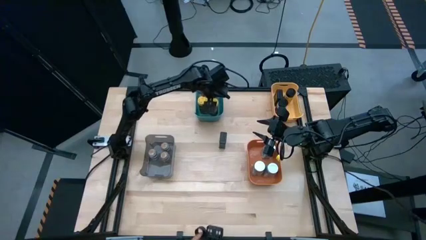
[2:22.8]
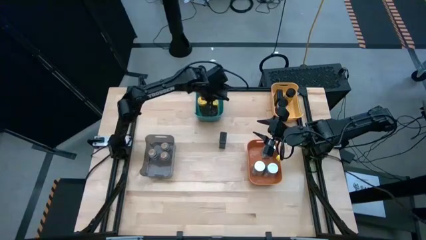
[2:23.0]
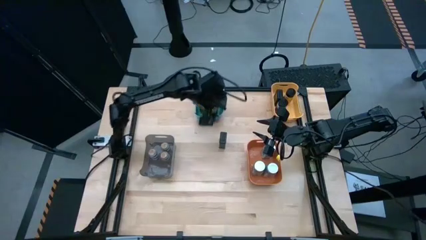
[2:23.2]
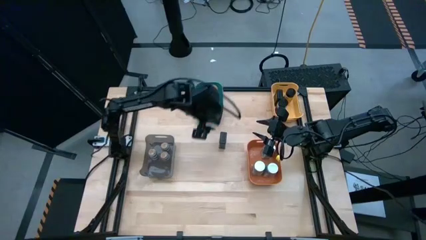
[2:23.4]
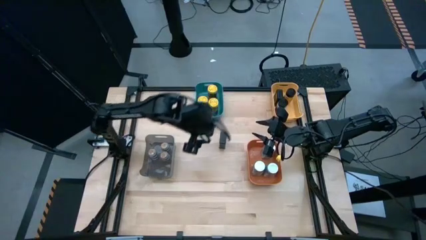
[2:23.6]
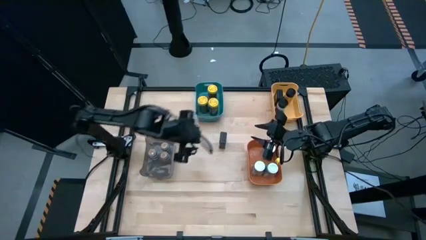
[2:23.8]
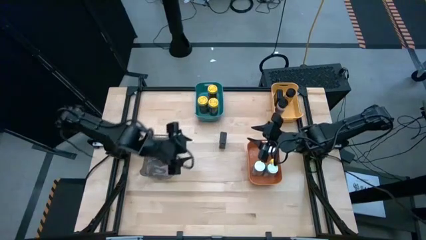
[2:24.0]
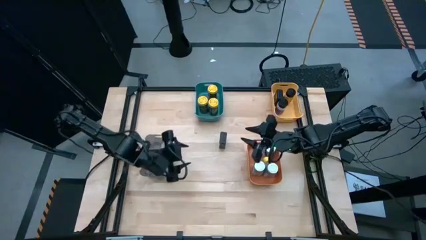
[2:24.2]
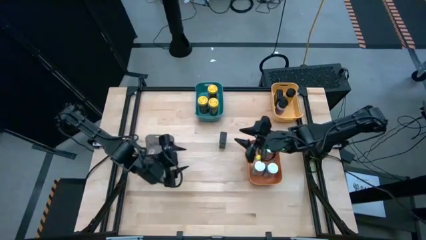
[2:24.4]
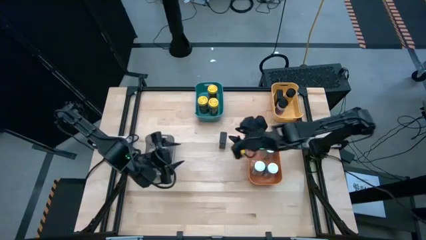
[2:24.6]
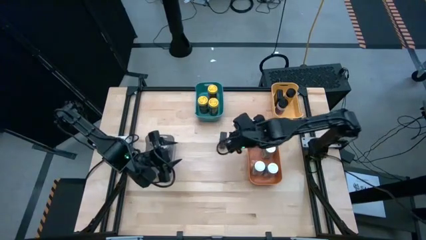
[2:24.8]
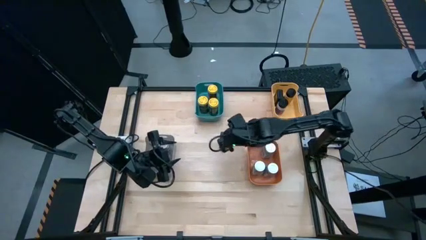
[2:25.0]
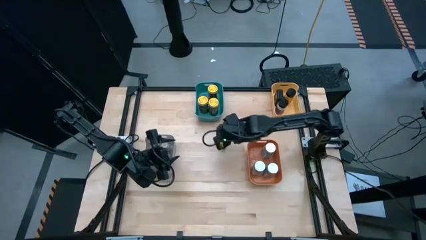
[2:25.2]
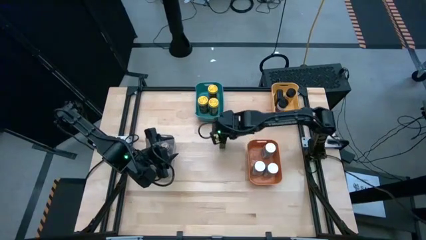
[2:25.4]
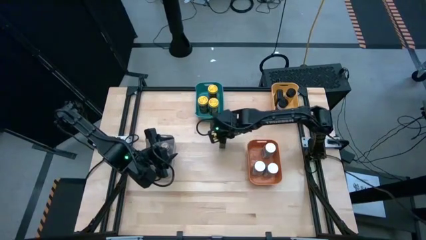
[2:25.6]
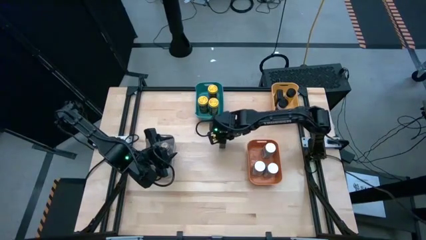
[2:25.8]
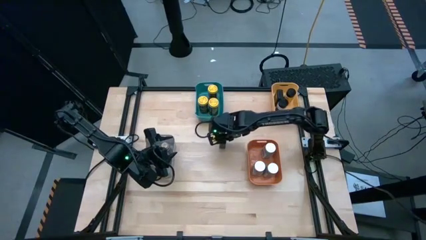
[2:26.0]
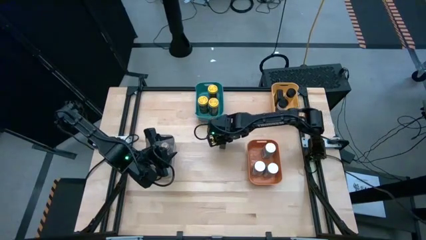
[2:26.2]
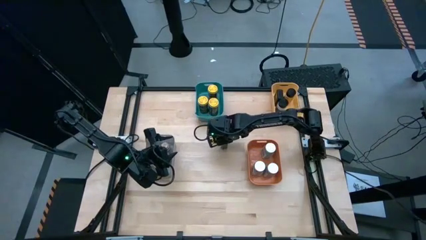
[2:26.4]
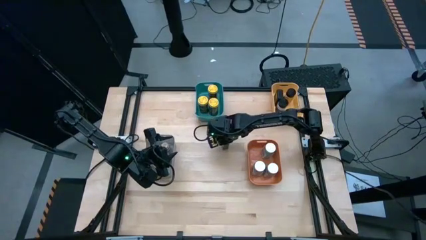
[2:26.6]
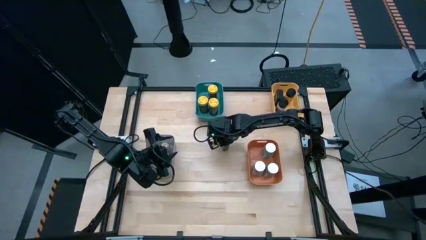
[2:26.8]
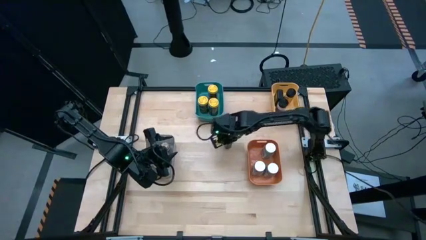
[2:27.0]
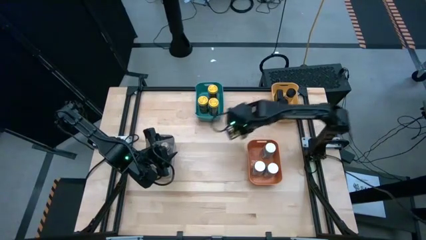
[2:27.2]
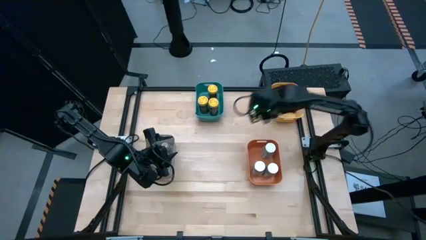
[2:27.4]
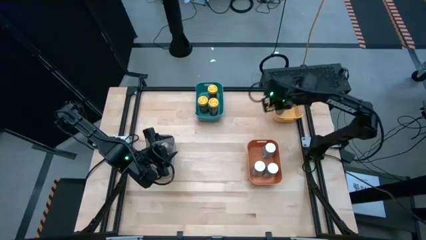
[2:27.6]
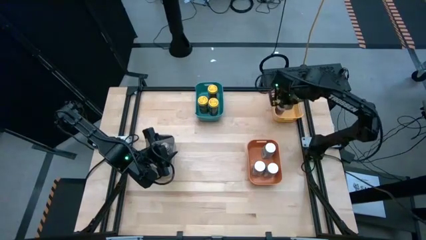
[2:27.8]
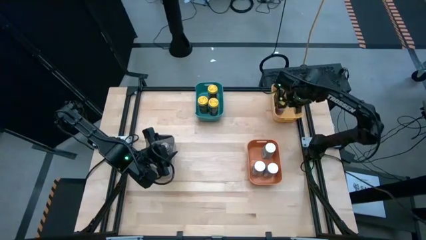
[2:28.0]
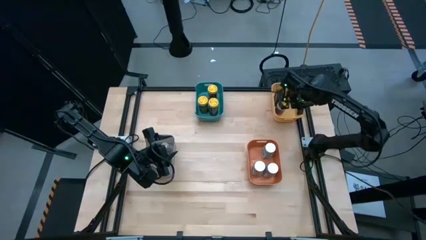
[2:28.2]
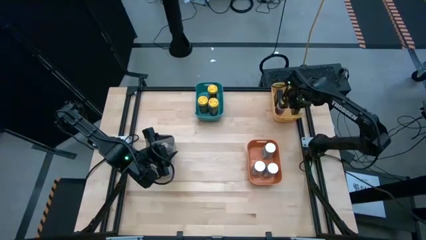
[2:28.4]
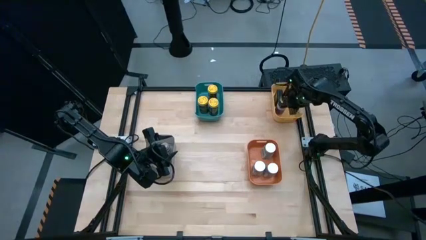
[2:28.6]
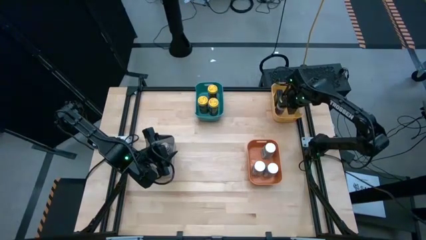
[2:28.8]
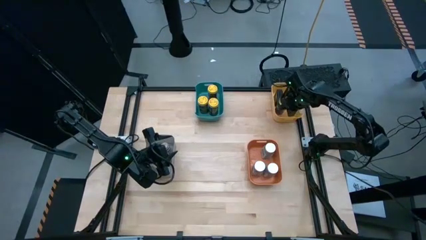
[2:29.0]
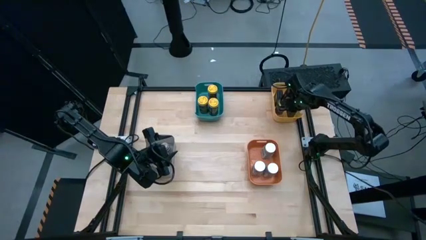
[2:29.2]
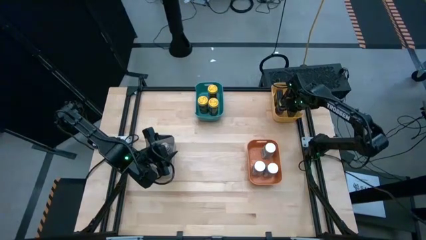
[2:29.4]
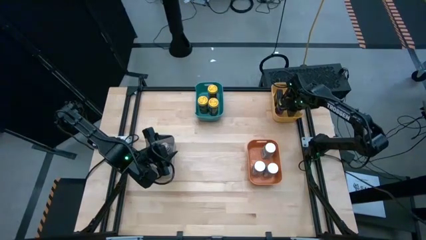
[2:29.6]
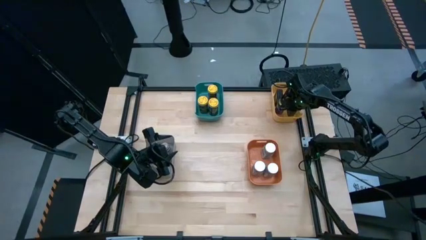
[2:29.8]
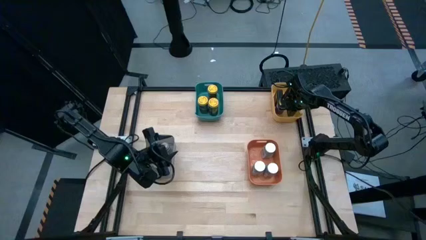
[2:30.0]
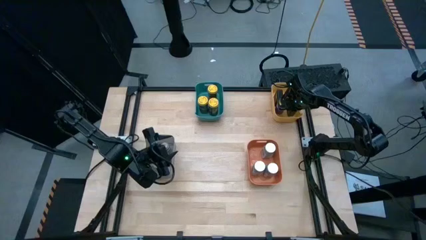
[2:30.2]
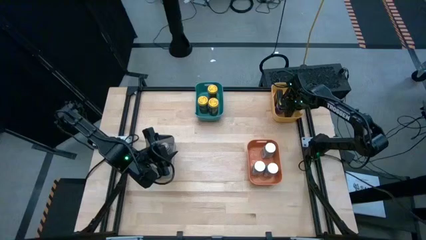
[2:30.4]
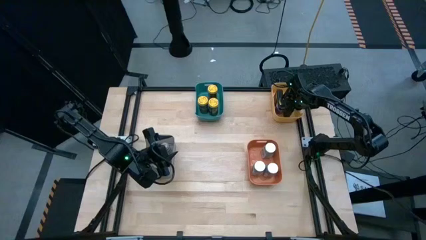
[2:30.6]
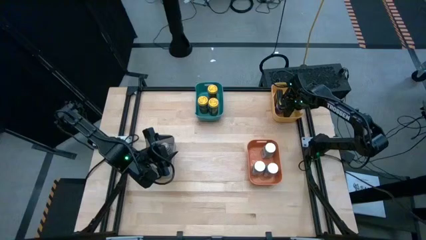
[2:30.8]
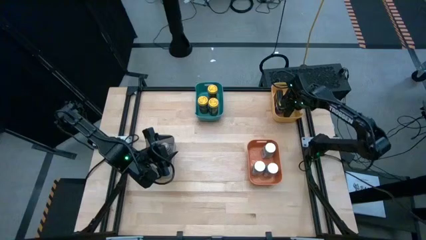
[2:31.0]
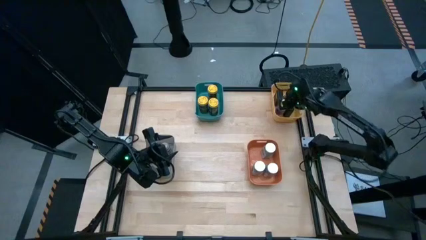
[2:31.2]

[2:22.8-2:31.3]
Task: Sort spices by type
Put the black seasoning can into the yellow bin

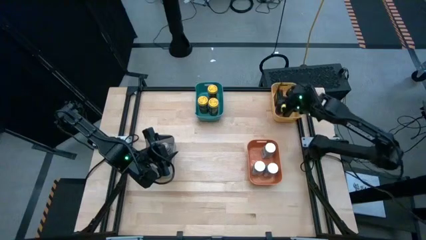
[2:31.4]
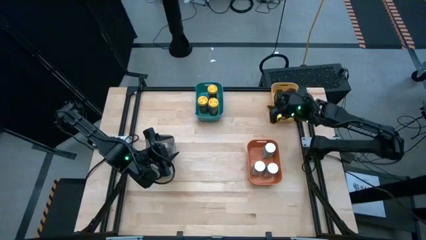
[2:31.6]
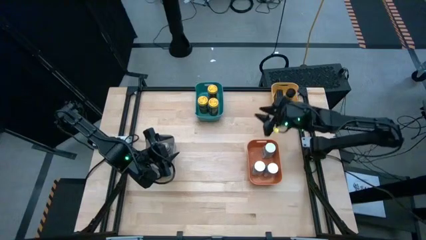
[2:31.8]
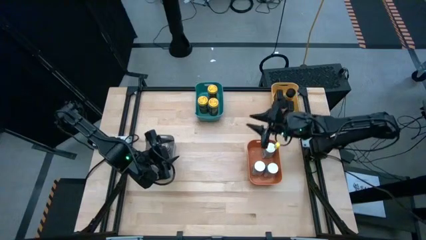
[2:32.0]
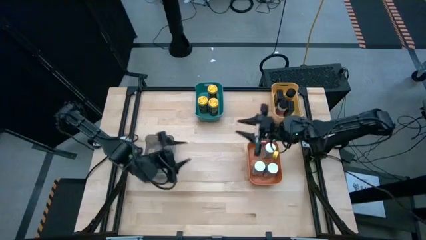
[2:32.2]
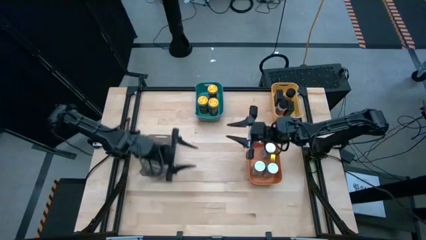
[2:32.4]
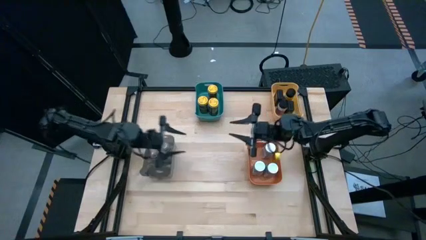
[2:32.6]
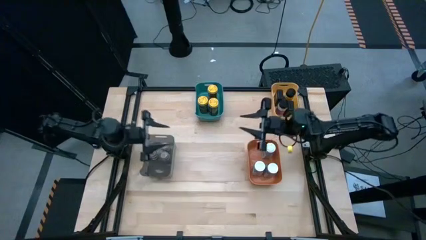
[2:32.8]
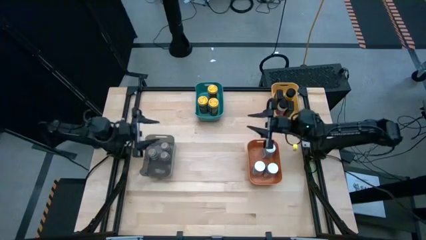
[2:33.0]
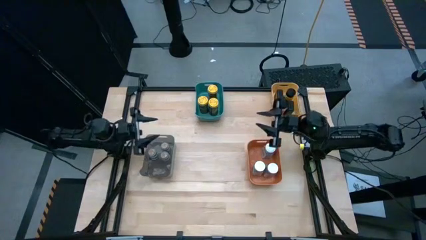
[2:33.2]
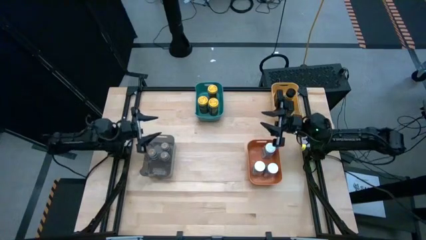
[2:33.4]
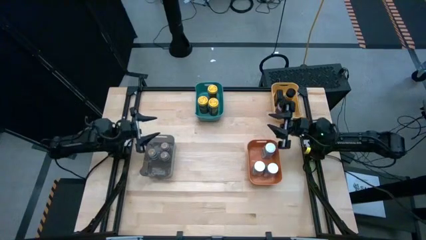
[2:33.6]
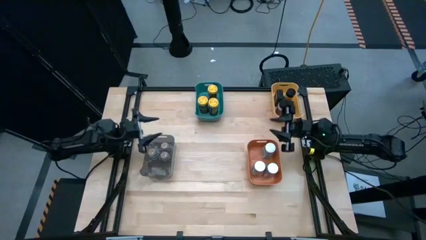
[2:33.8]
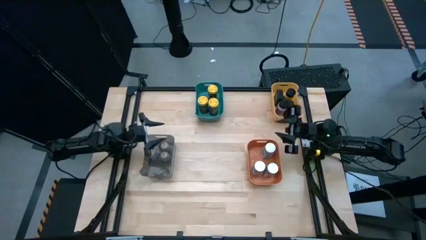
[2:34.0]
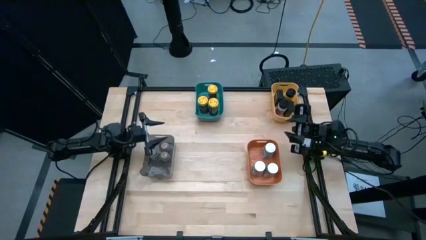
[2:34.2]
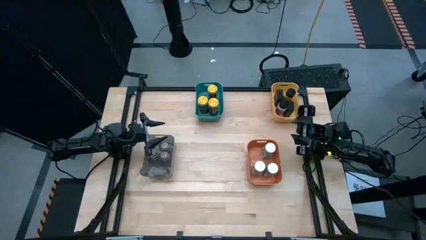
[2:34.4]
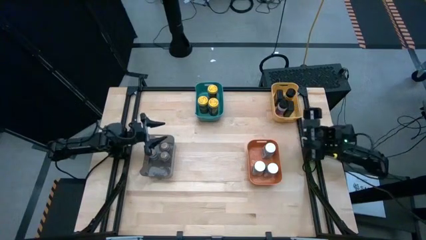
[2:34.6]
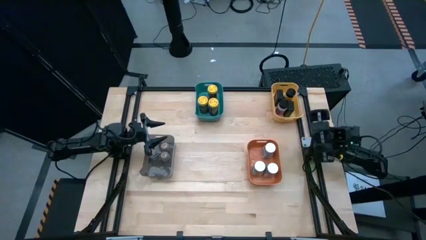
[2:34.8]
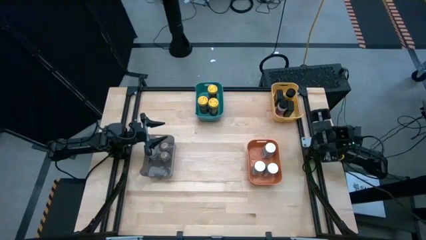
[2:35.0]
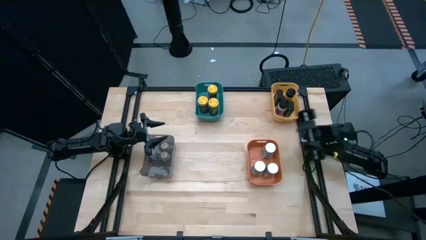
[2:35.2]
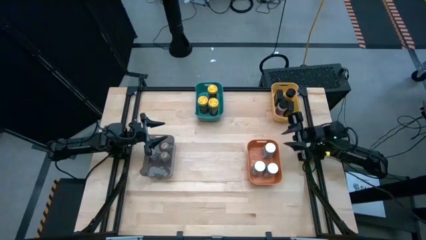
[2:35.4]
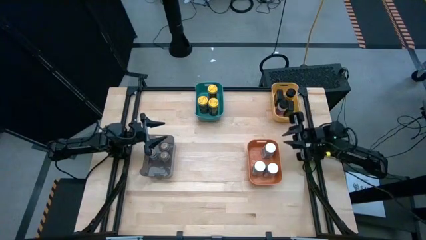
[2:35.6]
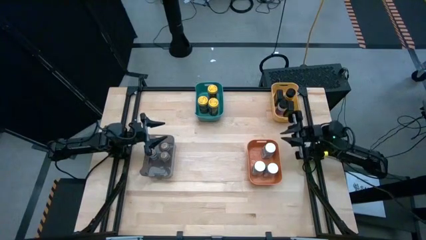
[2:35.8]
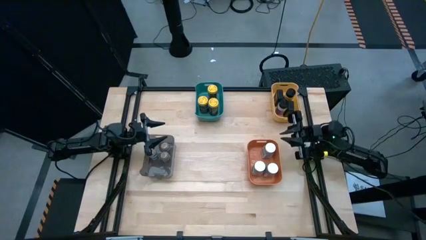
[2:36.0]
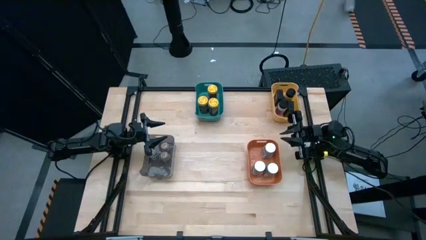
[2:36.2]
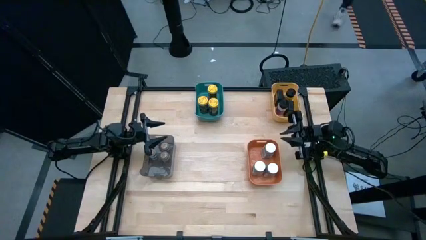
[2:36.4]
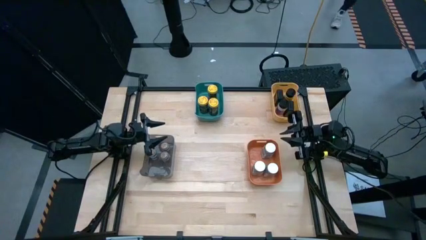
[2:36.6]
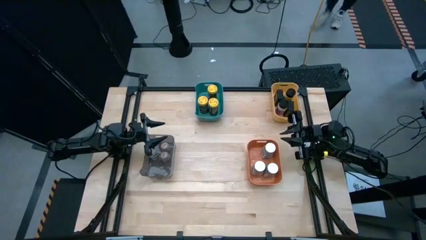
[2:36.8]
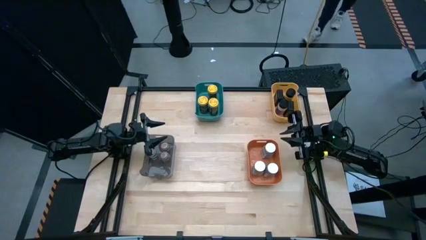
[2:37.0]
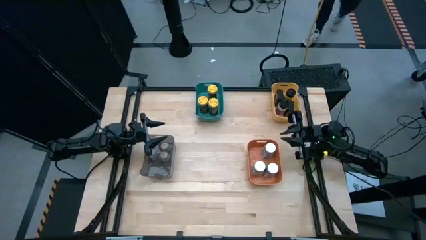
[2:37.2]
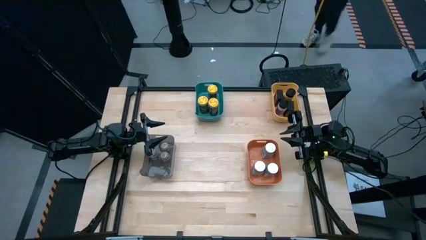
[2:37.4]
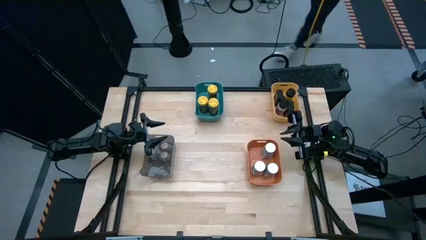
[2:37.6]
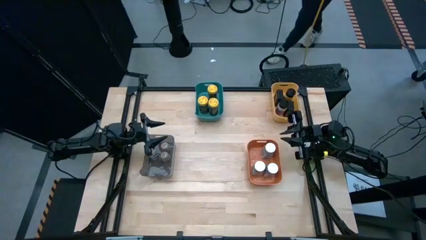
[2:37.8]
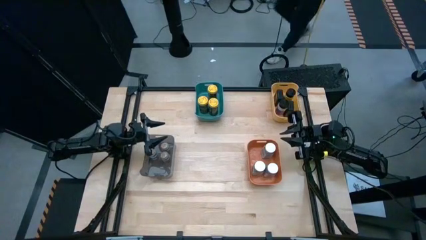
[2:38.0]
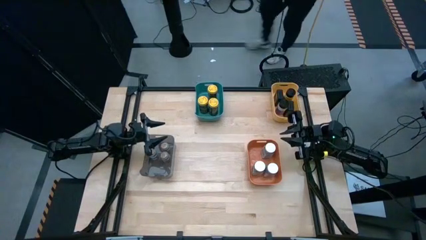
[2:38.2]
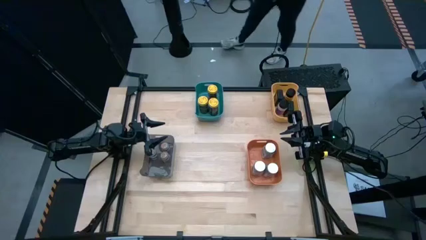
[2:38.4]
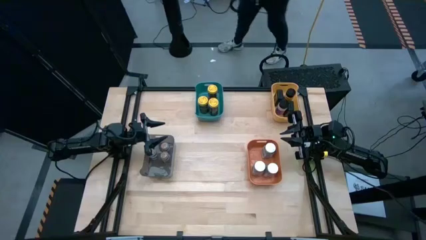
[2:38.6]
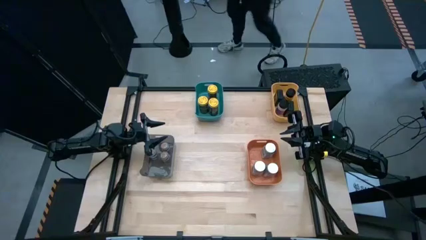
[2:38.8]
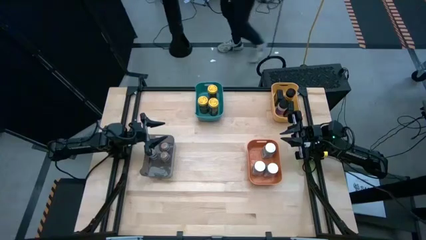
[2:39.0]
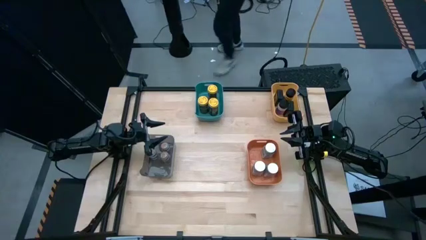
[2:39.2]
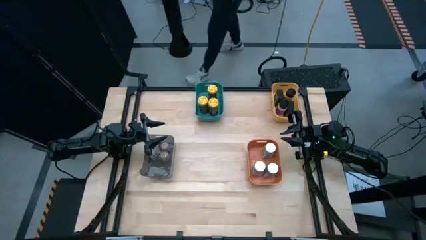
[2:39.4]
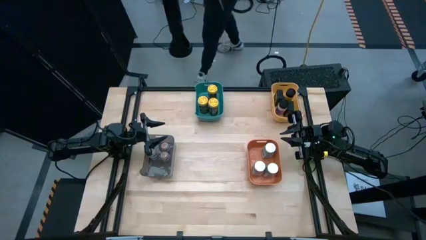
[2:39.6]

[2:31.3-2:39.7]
Return to Home Position
